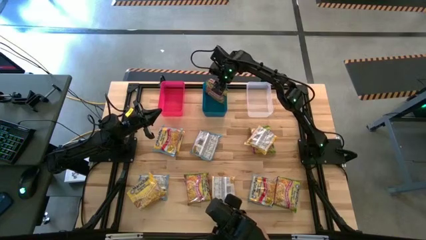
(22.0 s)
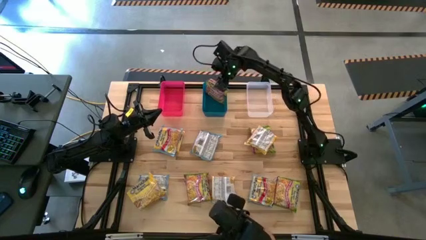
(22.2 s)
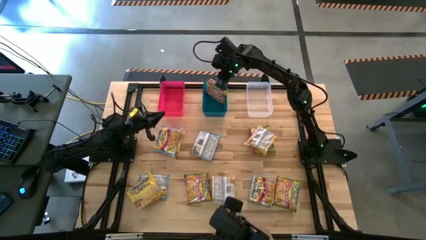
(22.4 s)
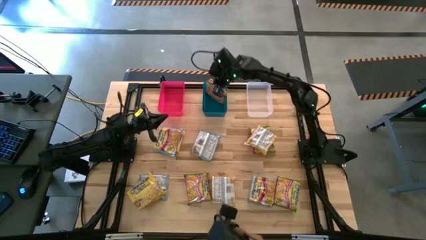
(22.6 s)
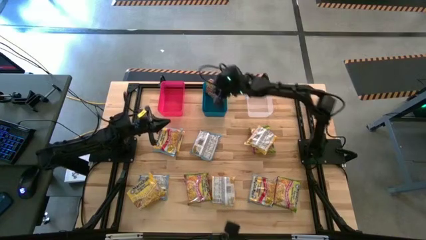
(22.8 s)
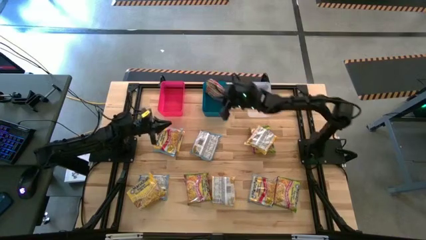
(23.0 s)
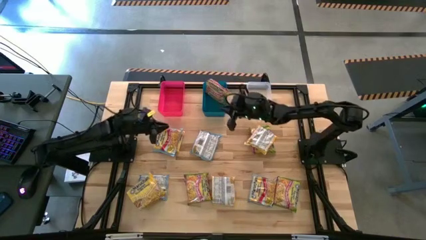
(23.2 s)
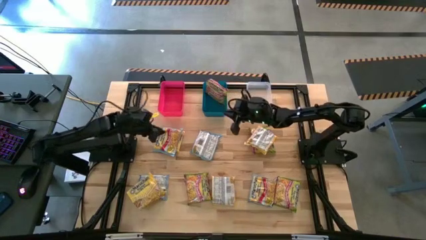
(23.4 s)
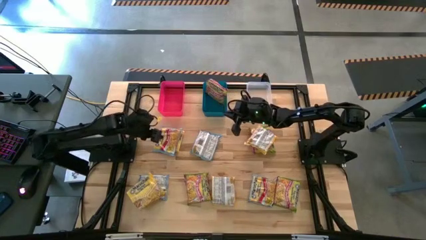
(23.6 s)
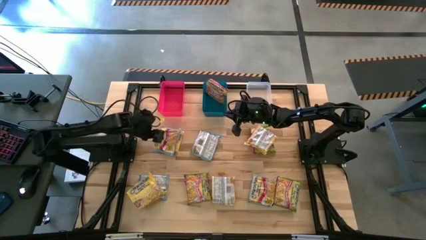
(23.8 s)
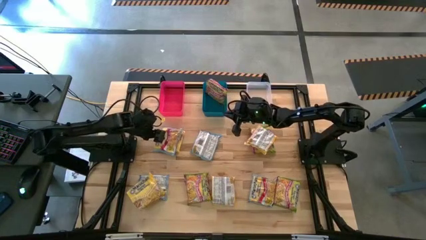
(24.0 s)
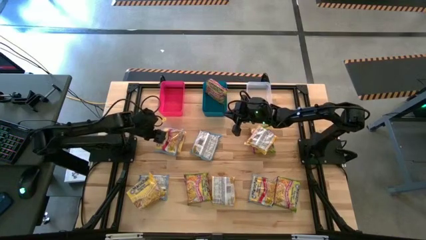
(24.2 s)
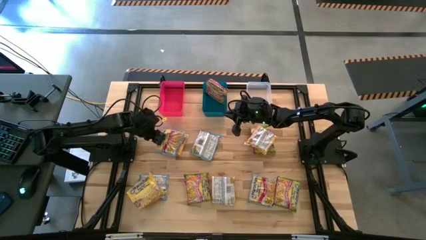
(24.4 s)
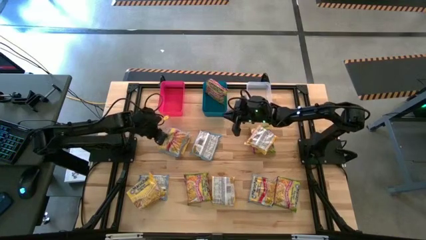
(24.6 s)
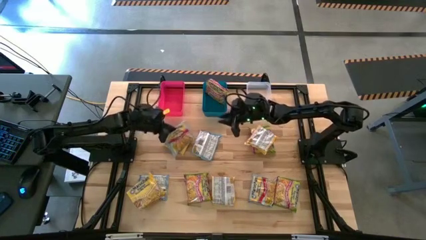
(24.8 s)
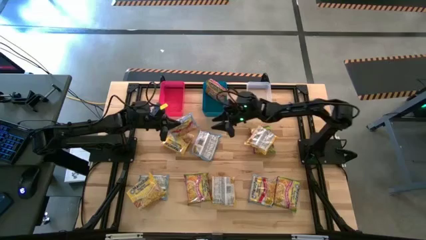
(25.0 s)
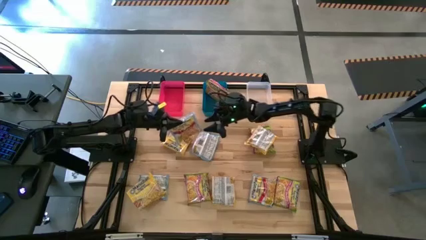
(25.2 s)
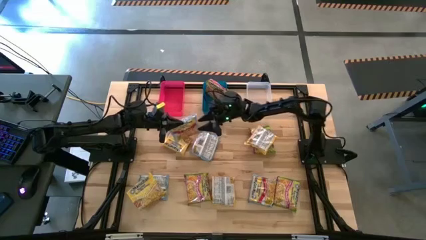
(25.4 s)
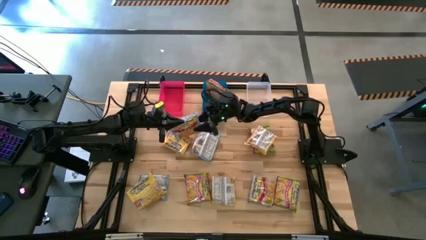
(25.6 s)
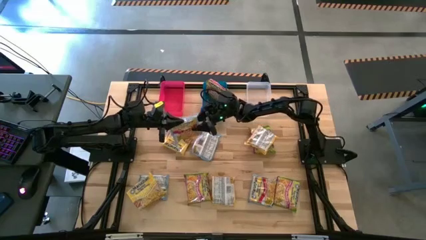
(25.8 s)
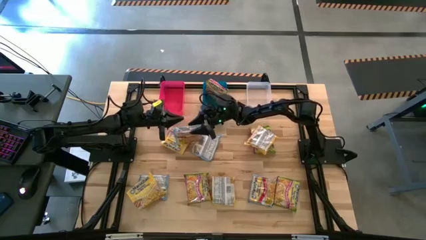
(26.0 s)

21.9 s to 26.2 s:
Task: Sort Maruchan noodles
Put the top left blue noodle pack into the red bin

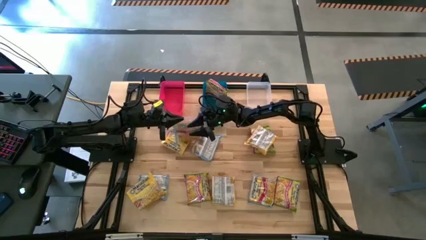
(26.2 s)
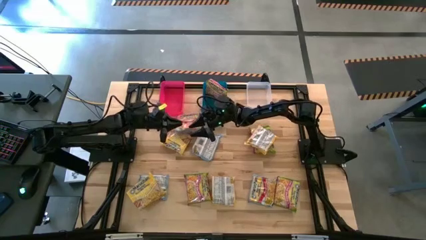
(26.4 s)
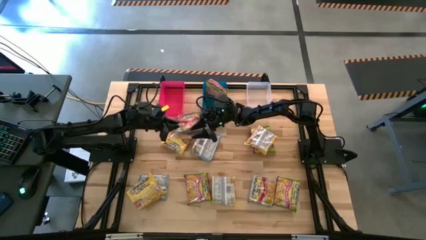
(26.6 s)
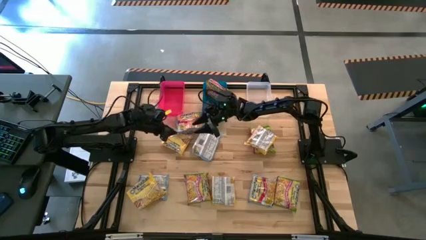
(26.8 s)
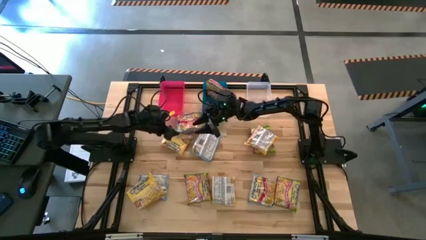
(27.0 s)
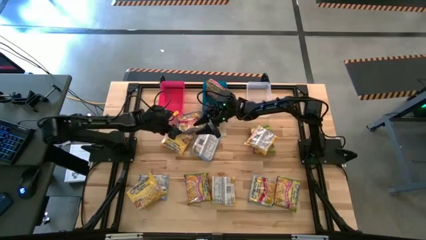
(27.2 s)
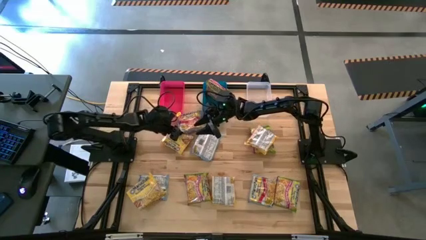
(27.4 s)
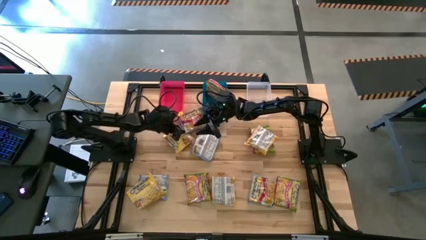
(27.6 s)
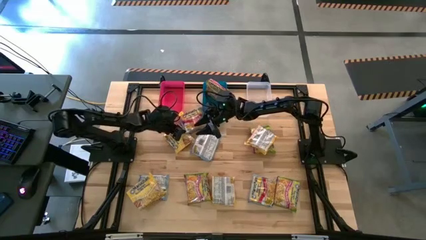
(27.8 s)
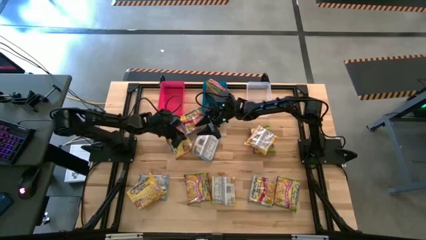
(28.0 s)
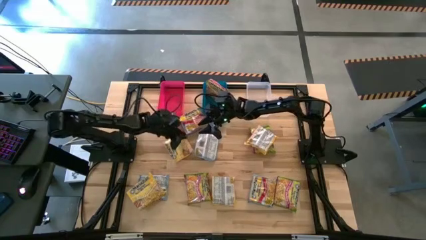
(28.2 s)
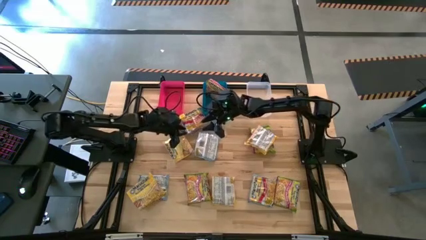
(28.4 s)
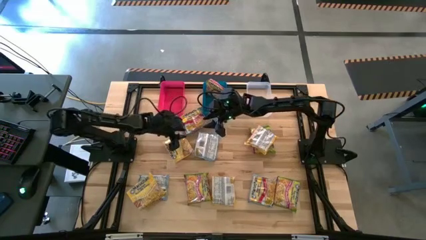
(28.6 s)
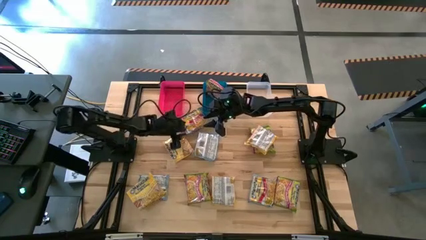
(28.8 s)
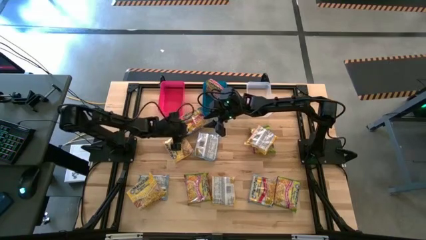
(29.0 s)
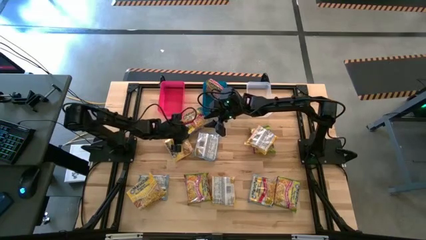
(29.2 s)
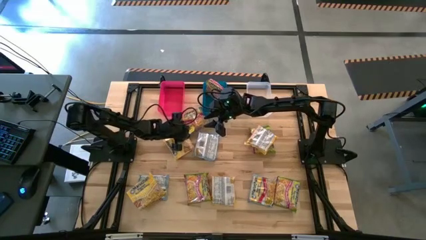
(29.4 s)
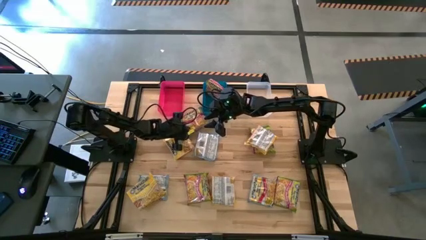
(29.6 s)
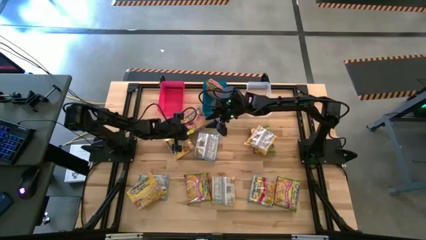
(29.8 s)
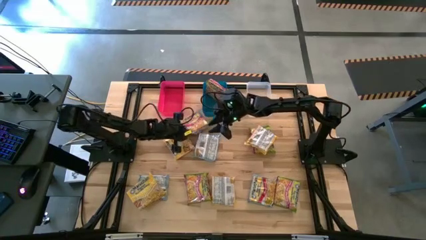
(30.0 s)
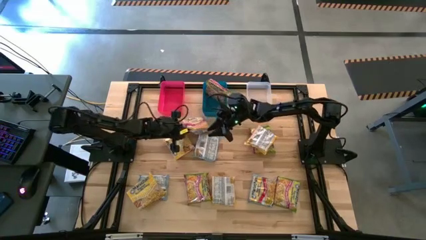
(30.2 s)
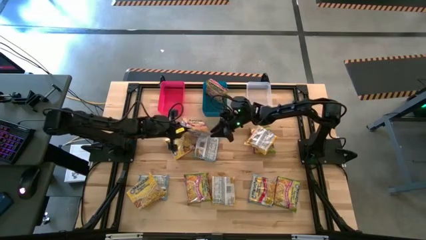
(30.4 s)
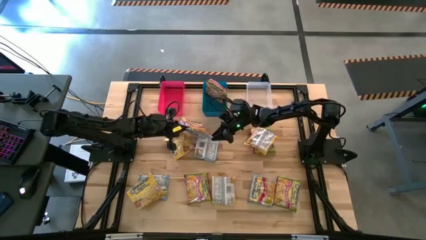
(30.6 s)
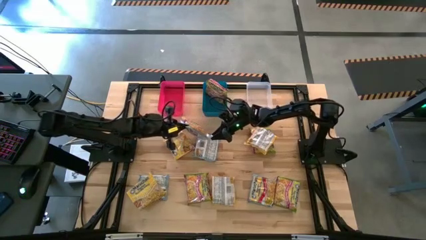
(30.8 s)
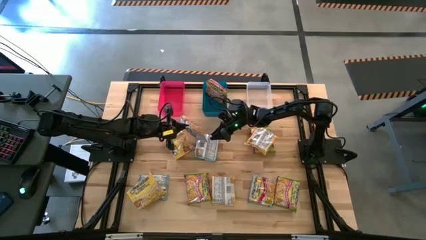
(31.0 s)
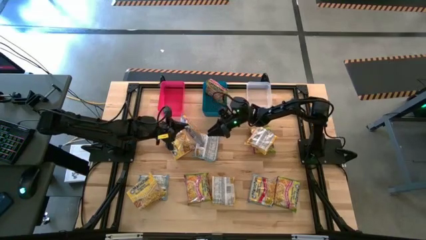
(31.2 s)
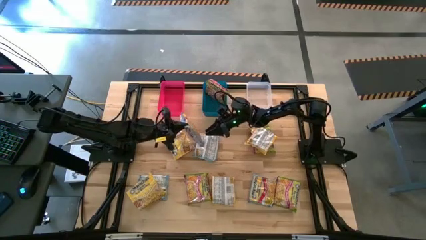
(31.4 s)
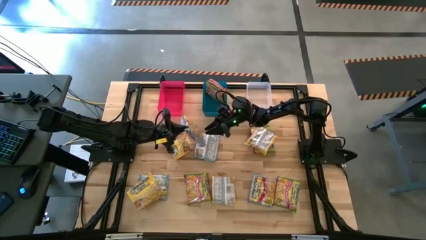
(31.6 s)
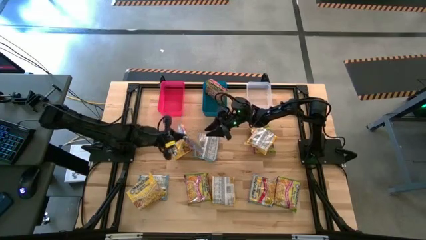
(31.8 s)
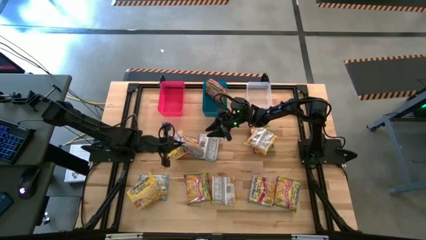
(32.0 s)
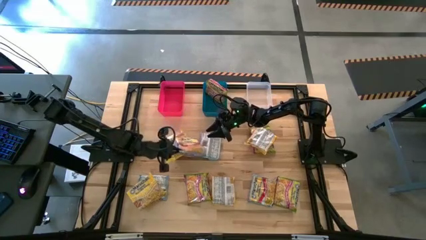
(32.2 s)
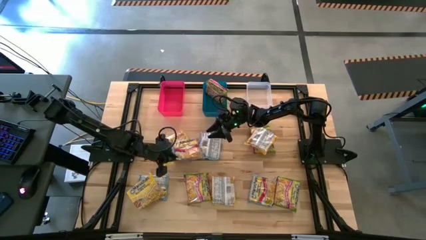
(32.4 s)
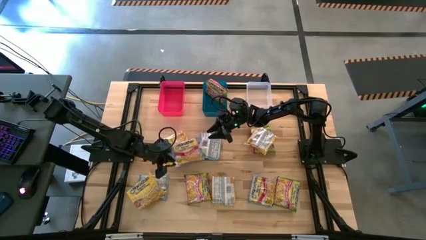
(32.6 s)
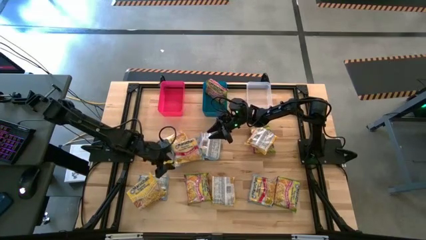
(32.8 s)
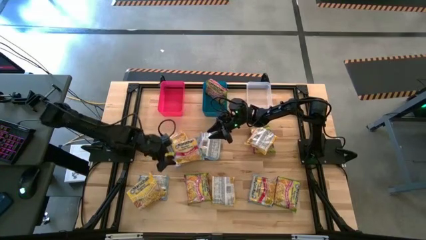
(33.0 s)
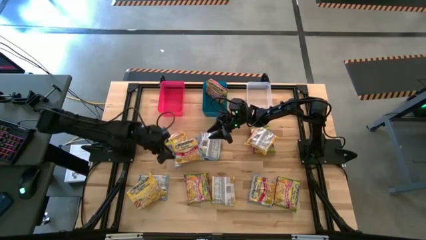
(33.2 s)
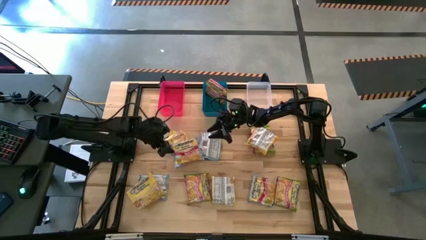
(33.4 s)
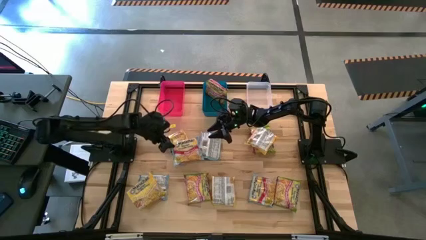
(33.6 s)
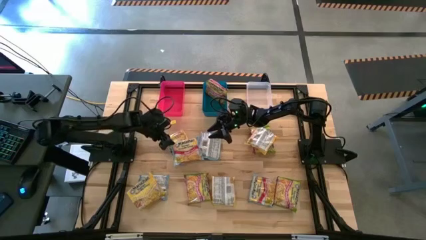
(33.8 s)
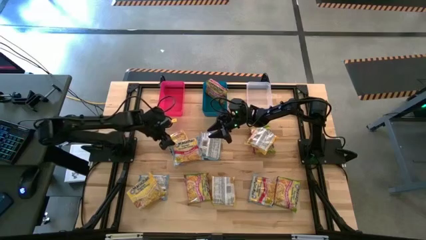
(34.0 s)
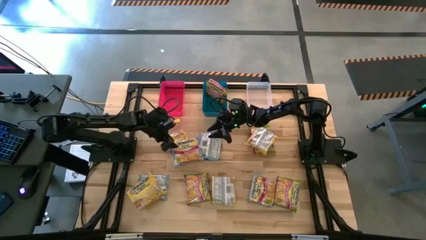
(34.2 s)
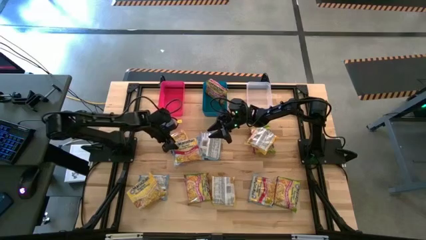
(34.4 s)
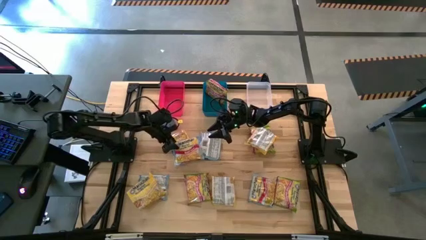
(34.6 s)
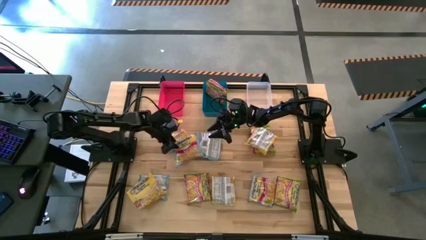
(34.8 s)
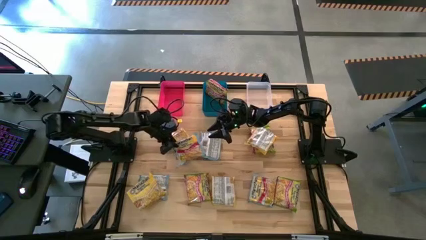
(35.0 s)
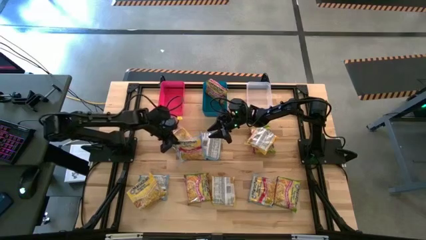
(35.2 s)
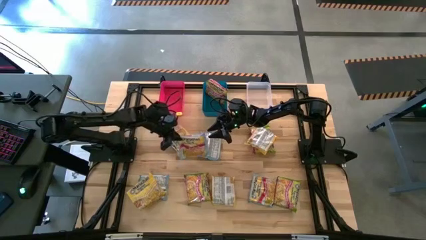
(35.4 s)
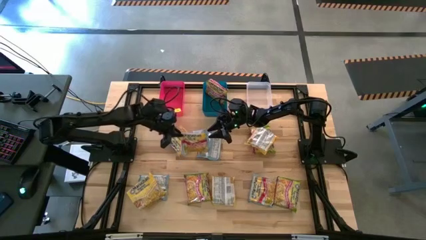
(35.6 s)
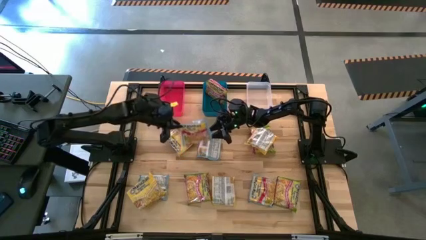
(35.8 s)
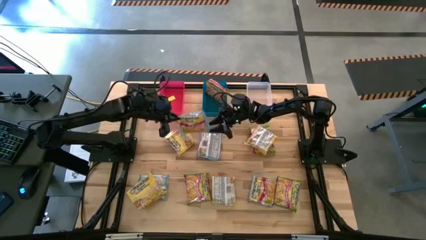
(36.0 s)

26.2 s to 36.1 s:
Put the top blue noodle pack into the red bin
